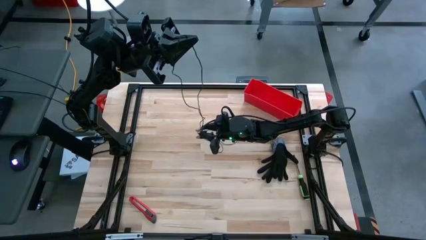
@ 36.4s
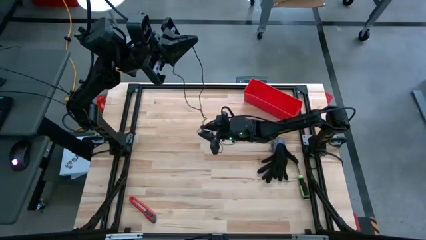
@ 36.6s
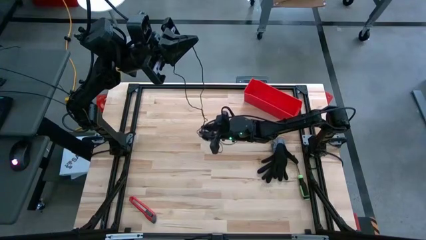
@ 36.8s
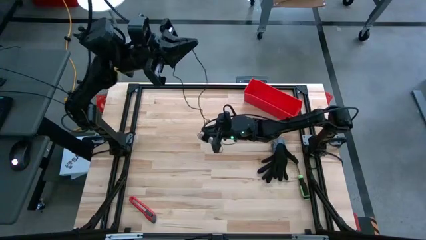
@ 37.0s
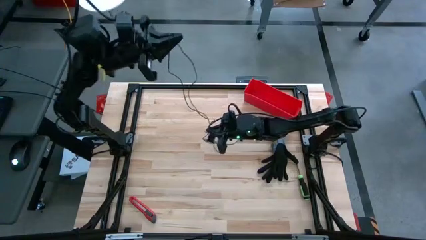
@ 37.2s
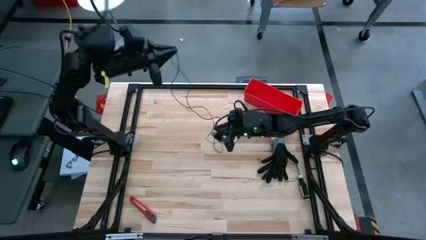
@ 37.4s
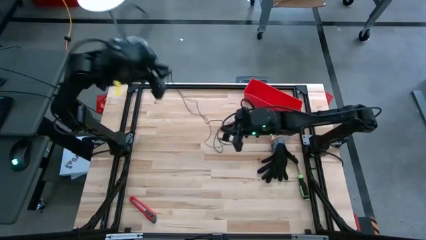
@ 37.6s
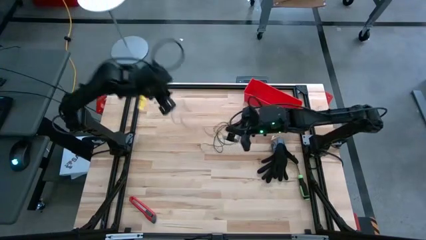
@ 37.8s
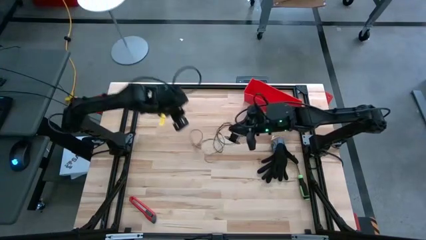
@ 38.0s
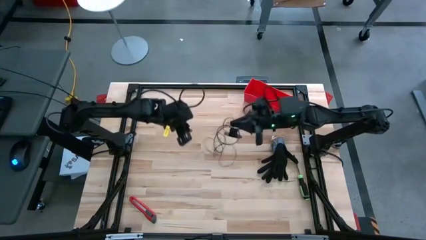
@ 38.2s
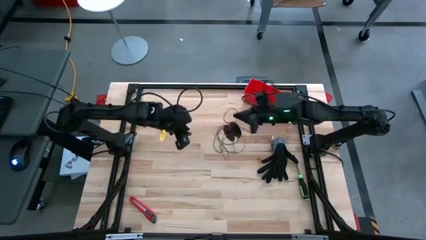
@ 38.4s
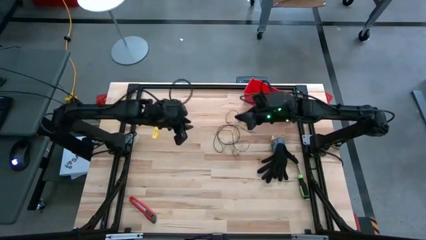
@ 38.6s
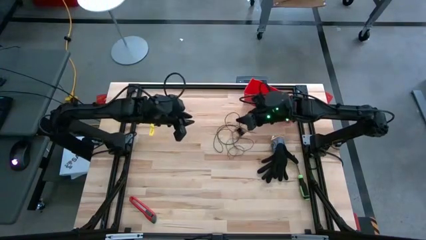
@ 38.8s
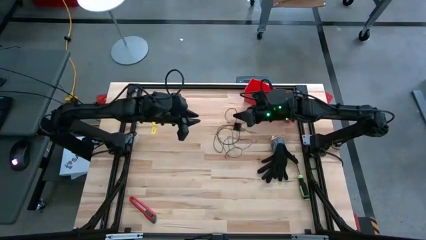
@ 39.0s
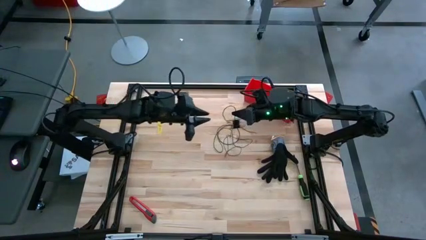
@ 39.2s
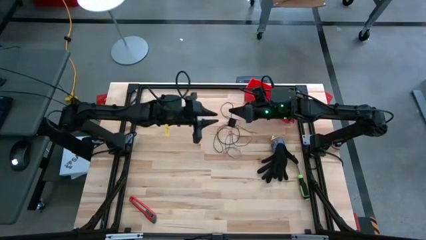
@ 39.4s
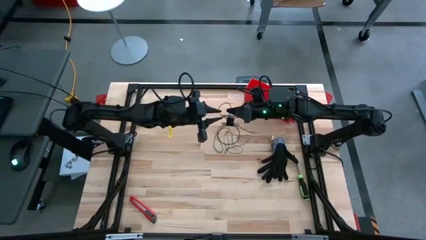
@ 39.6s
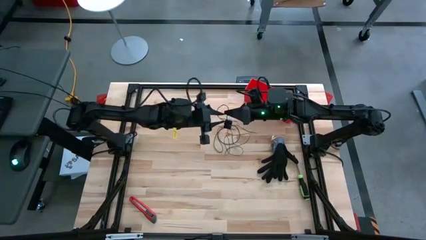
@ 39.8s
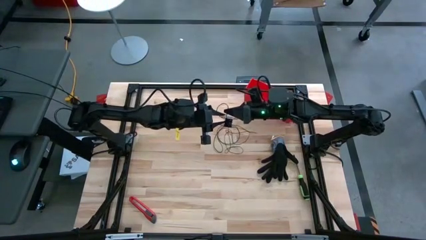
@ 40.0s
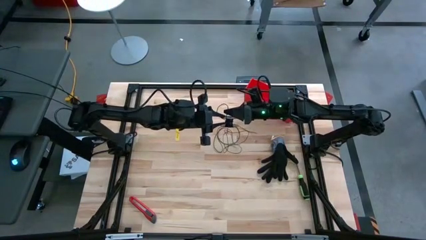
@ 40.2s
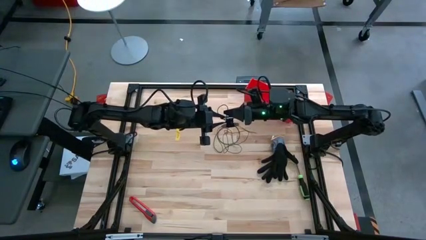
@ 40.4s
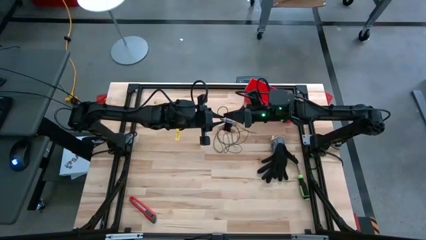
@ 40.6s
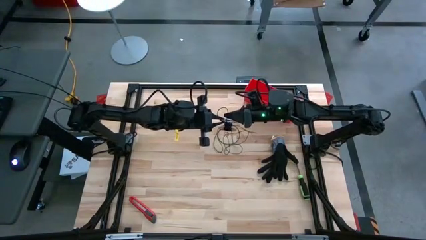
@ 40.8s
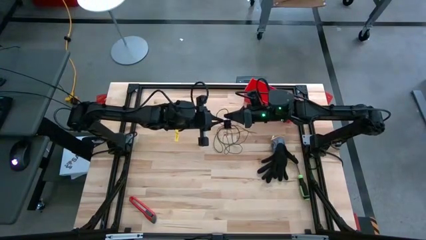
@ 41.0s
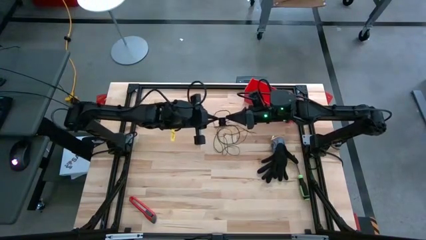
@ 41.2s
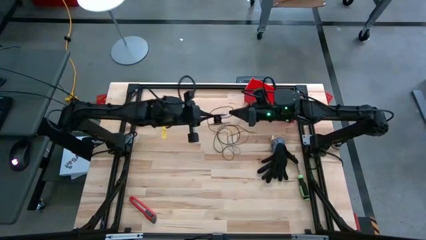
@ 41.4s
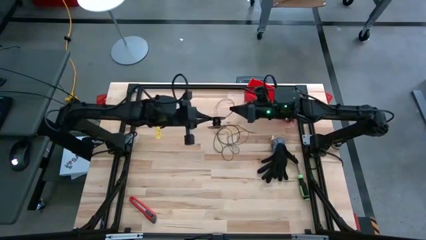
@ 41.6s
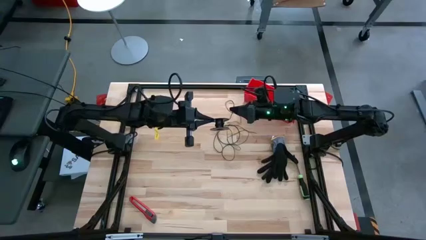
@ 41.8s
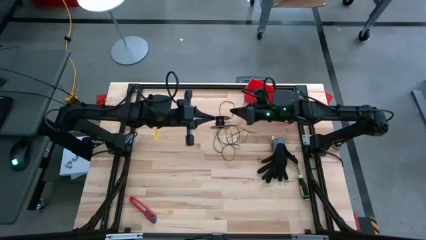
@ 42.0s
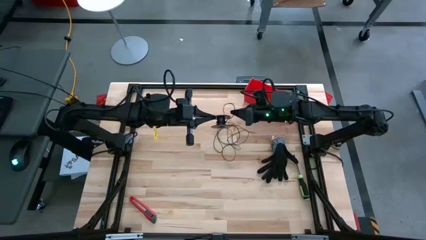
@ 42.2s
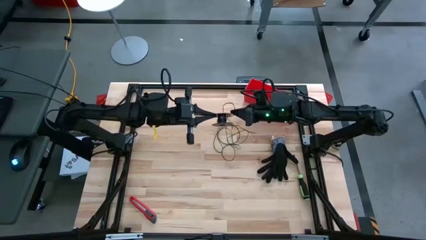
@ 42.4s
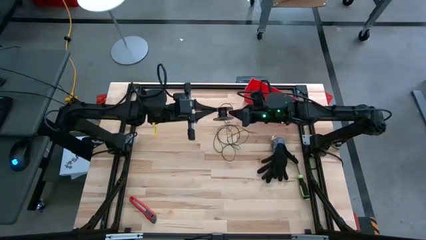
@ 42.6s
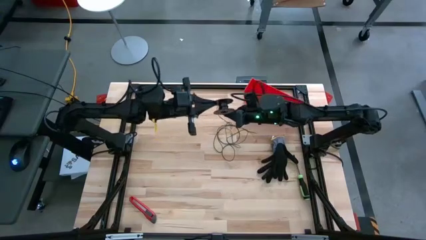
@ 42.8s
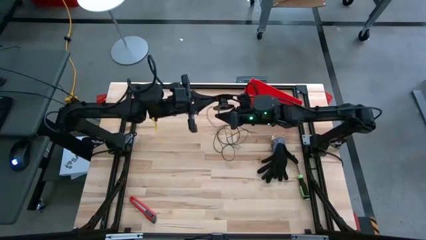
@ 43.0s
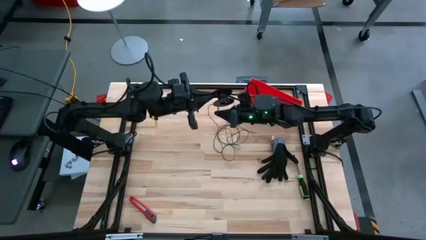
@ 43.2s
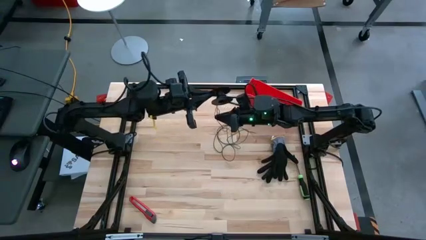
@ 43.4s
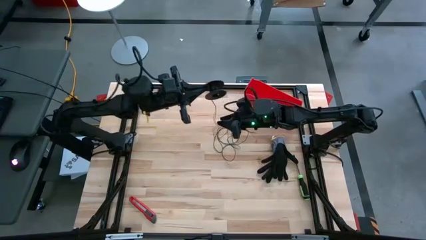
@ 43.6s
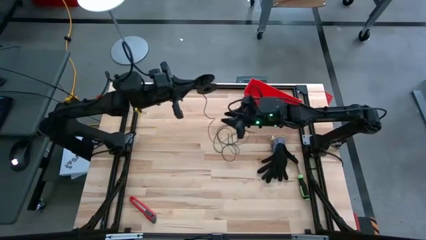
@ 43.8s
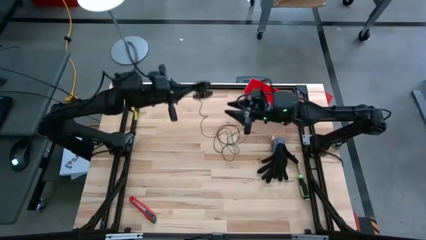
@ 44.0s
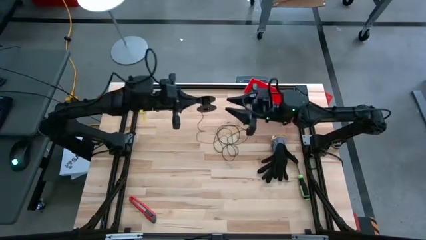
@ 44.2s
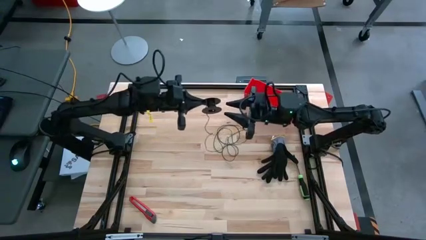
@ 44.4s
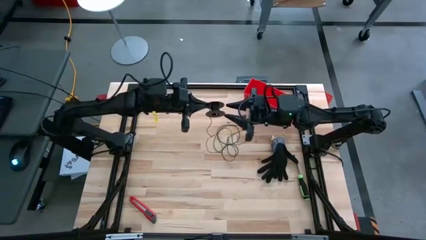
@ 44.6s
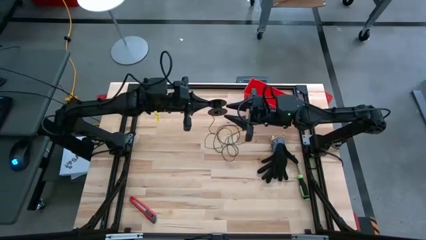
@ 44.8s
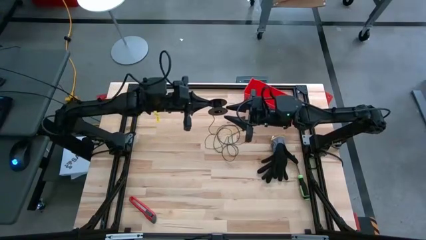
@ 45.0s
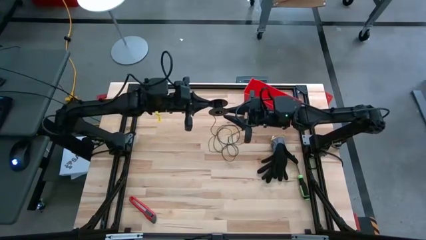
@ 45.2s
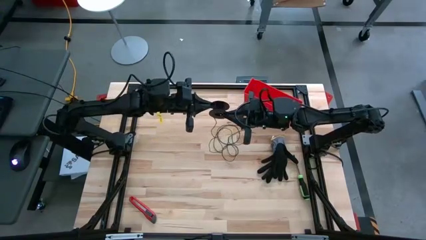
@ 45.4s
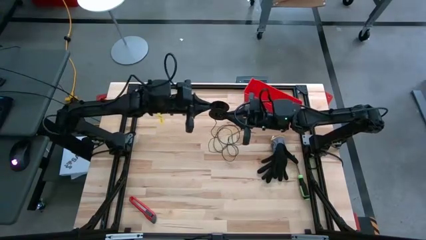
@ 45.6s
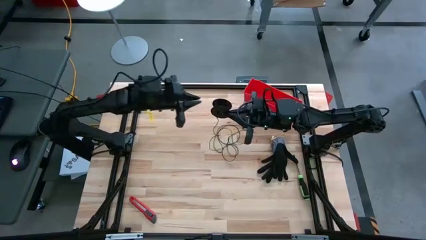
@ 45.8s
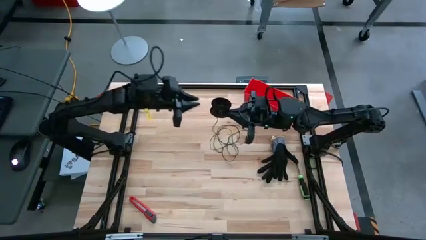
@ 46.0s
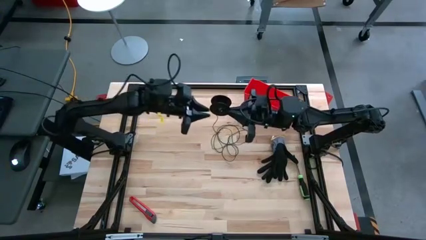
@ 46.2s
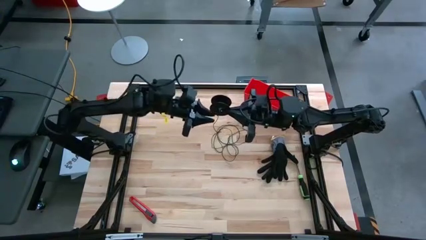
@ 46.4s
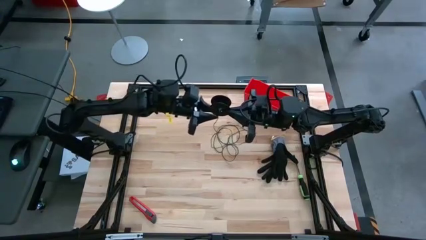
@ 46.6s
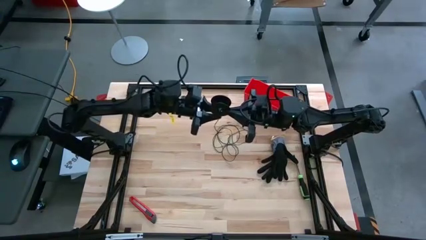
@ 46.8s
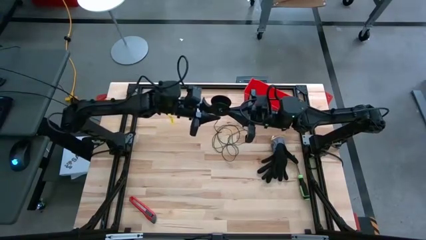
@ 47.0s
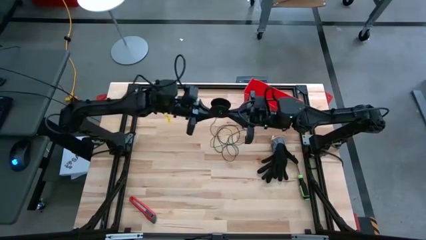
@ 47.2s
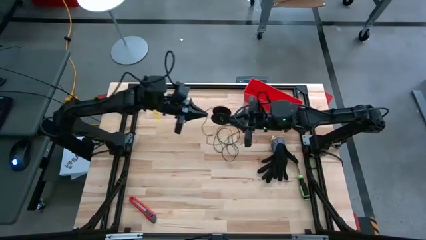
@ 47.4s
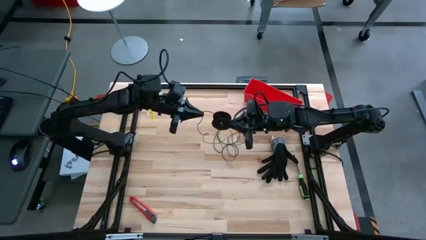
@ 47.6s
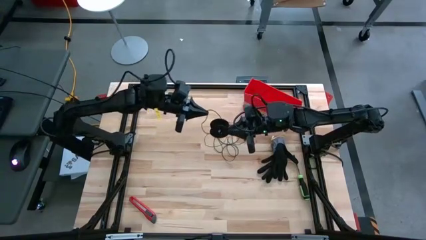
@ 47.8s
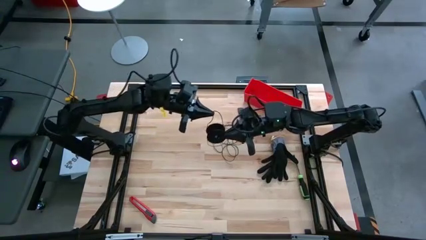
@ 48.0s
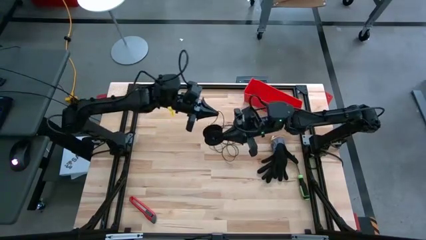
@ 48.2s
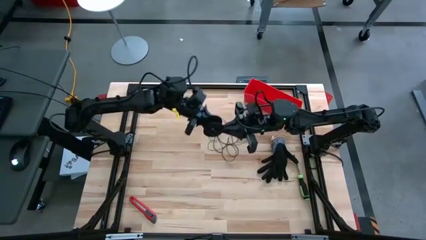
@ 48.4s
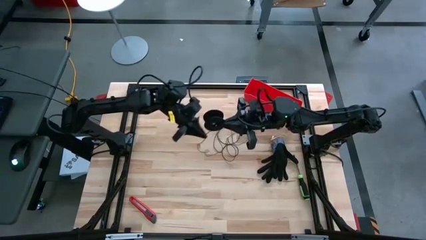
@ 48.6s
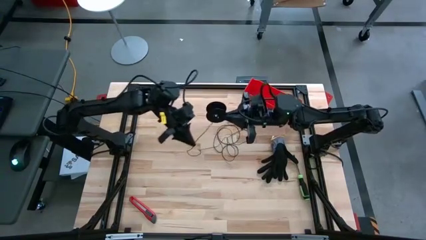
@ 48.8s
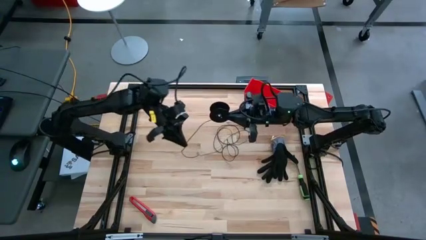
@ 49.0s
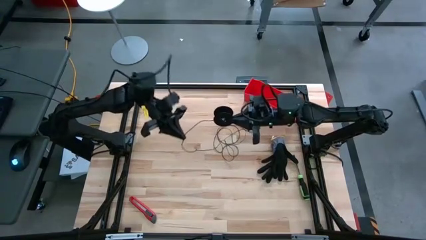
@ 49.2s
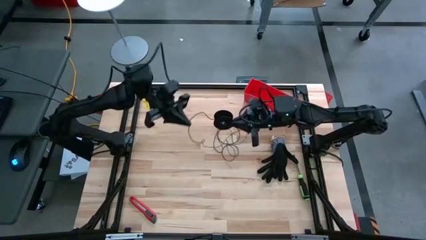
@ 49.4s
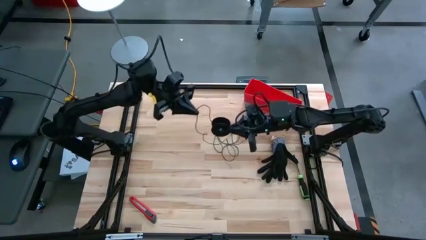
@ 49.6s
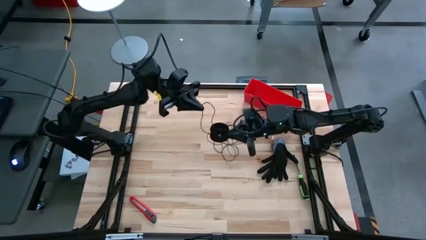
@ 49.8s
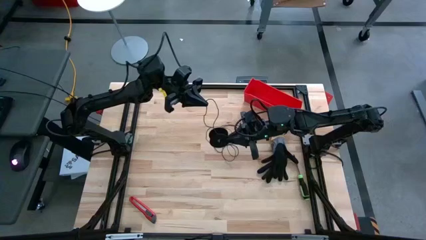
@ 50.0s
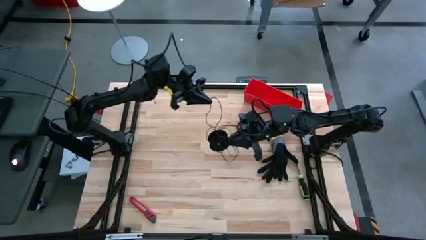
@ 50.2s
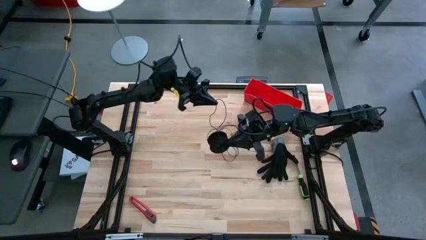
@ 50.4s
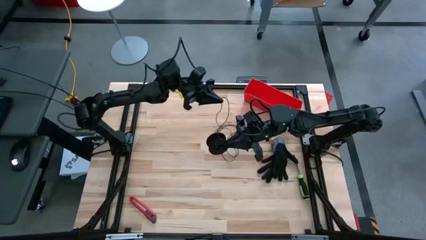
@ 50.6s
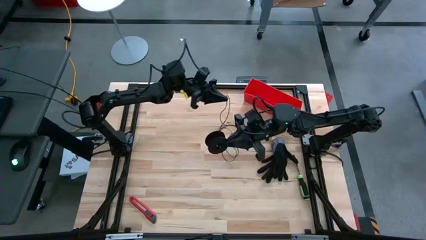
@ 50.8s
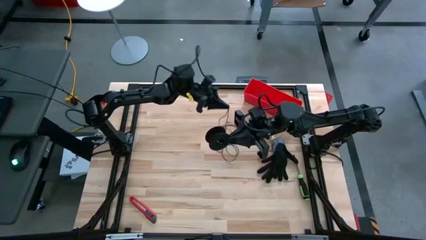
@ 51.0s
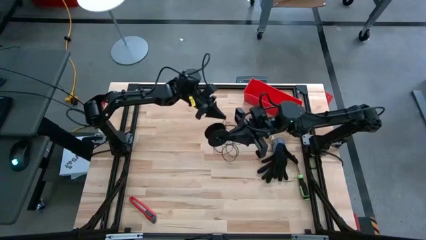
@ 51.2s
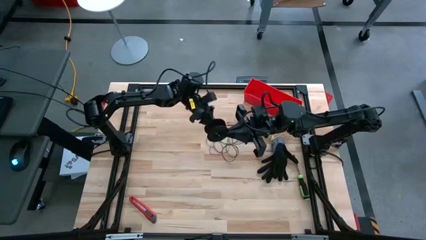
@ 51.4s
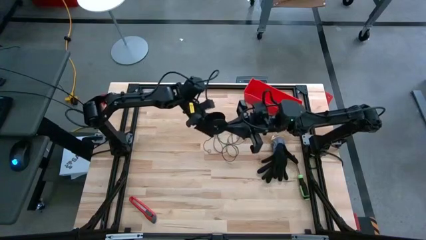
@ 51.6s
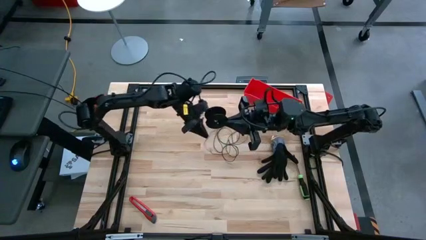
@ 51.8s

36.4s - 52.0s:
Task: Coil cords
Uncoil the black wire from the spool
